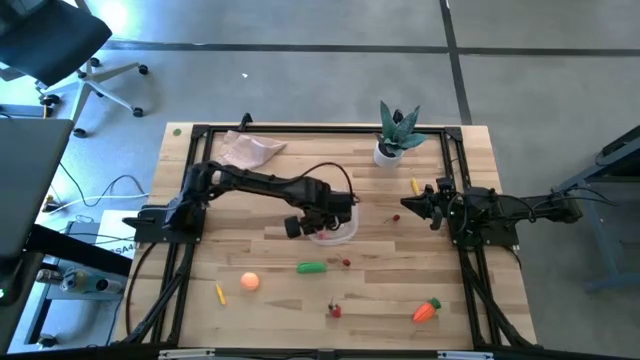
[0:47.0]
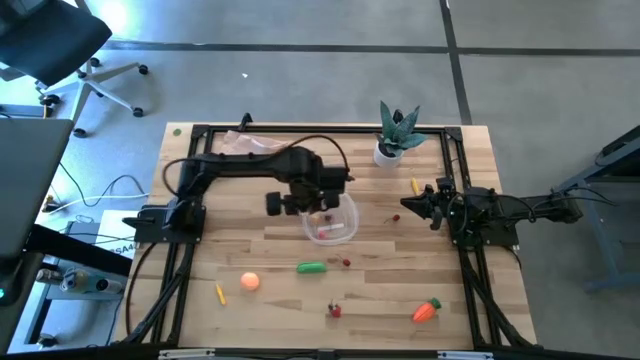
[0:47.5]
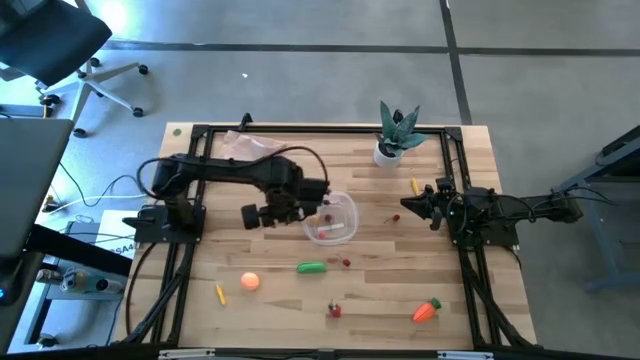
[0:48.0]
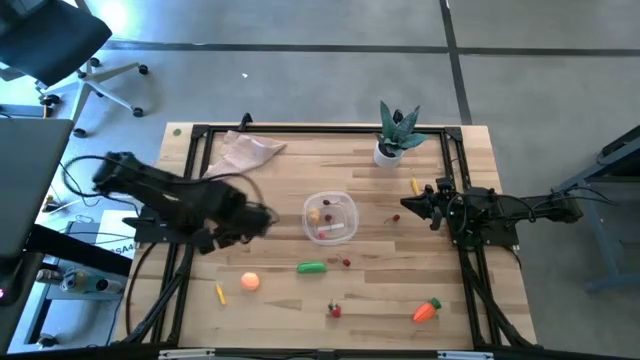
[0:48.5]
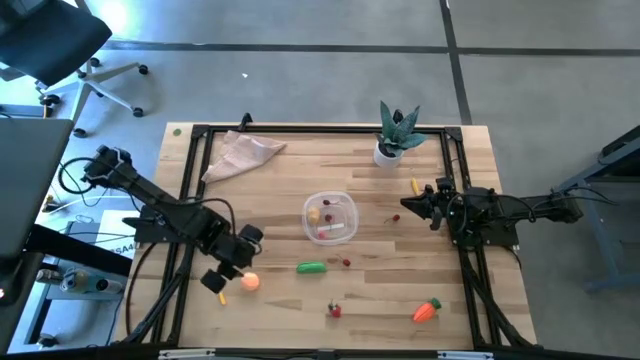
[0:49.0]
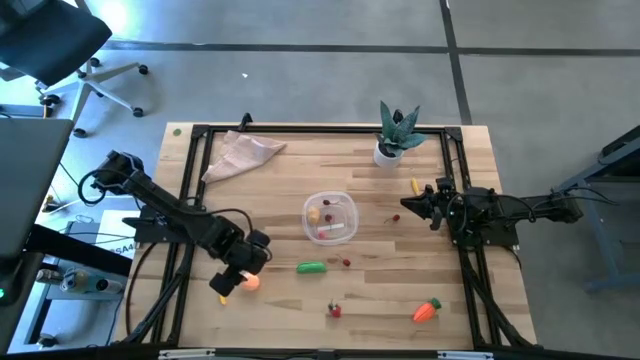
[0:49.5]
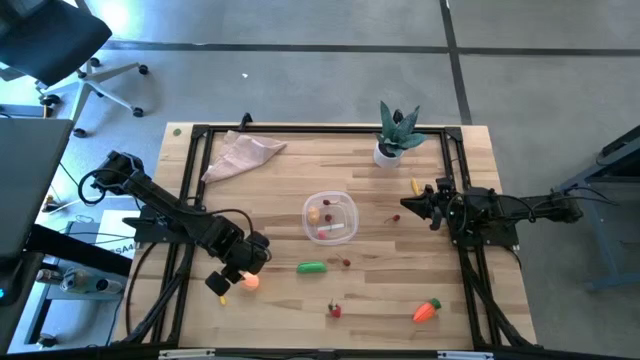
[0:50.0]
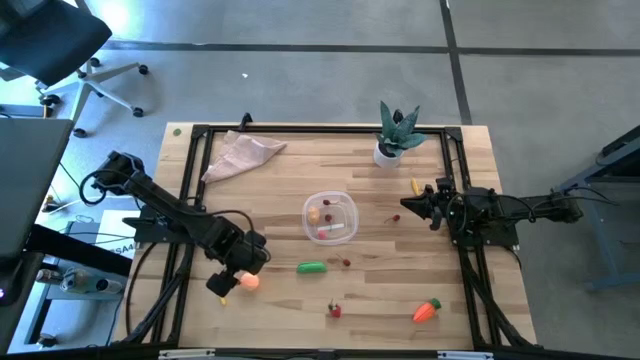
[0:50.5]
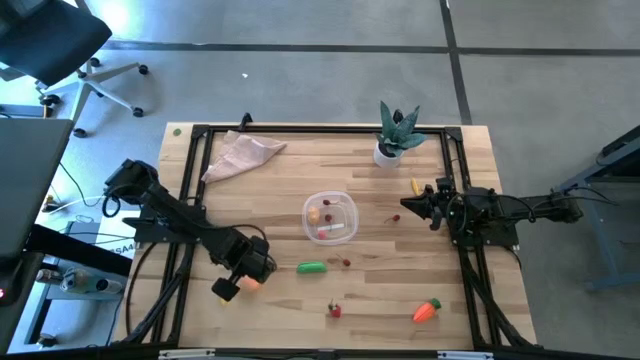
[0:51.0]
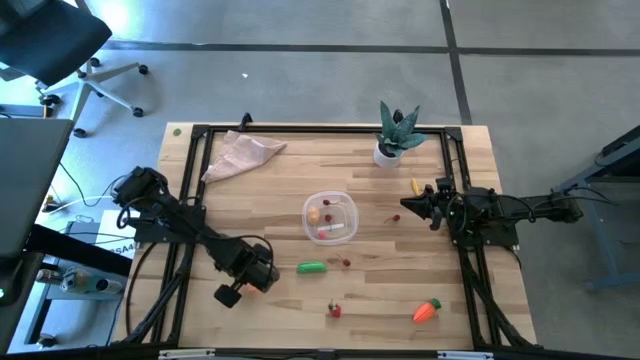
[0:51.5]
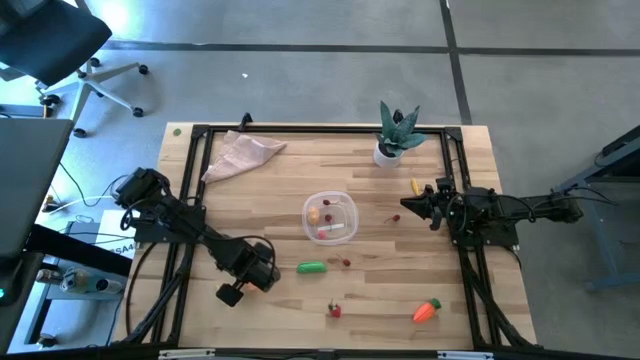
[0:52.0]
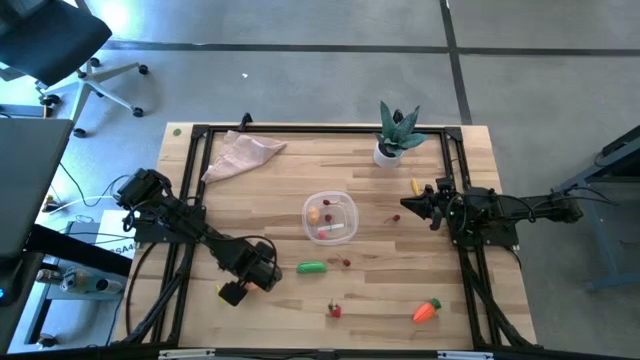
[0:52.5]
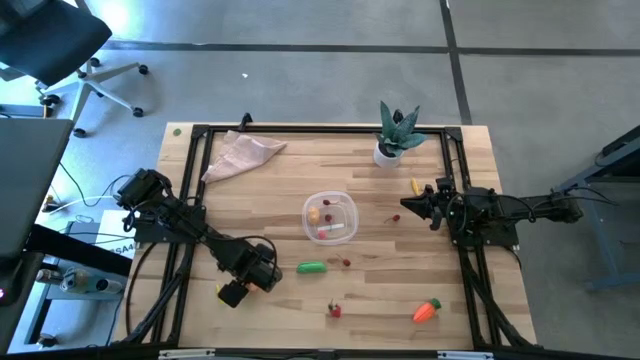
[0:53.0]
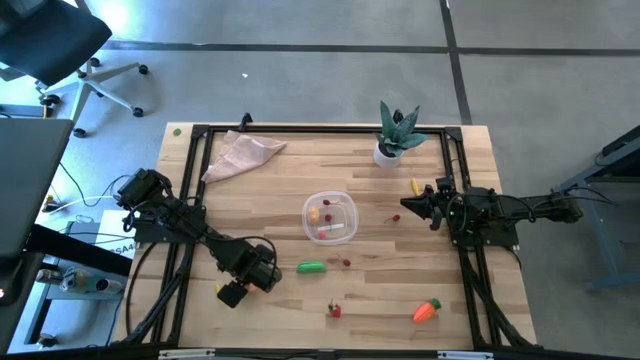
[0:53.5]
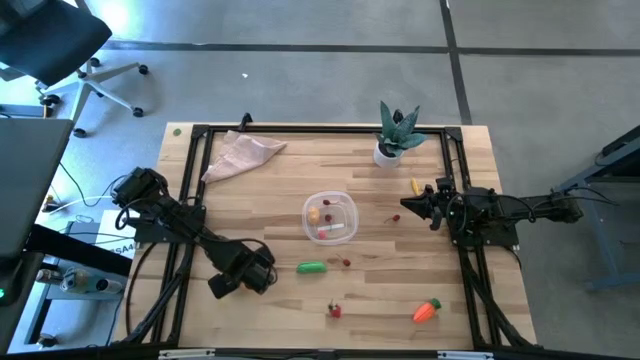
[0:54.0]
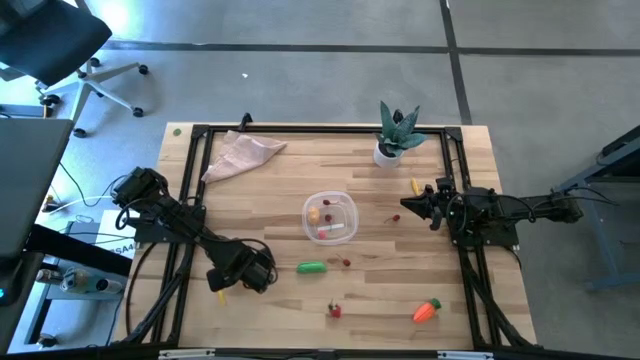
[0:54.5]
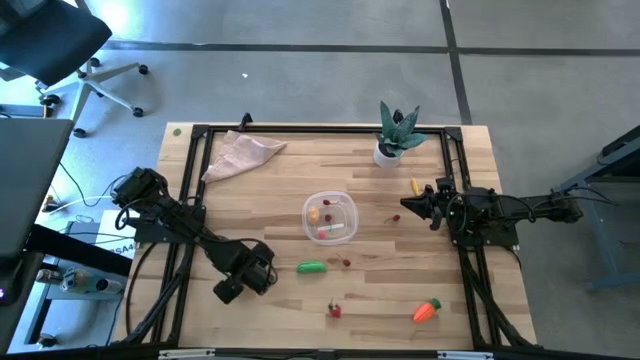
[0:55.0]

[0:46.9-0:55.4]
Task: Pick and placing Produce into tupperware
Put the orange peach into the transparent bin

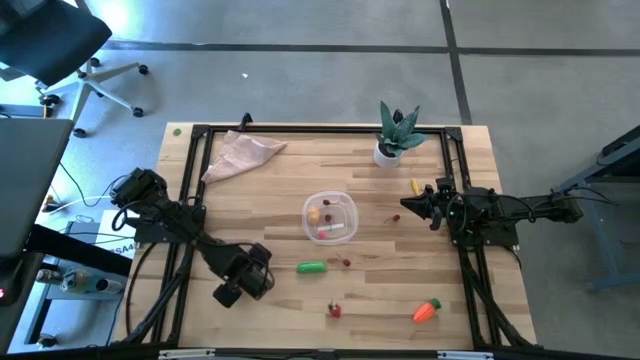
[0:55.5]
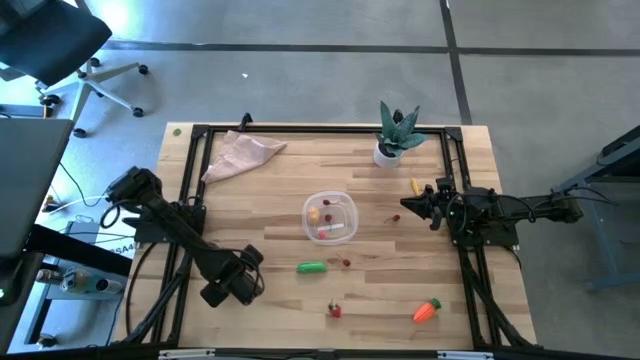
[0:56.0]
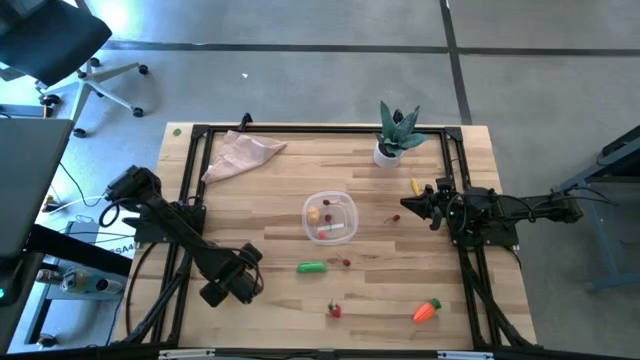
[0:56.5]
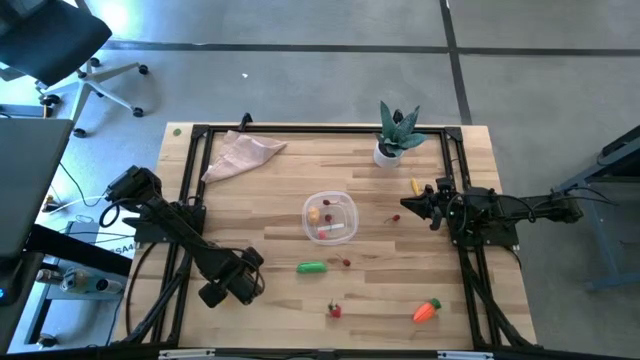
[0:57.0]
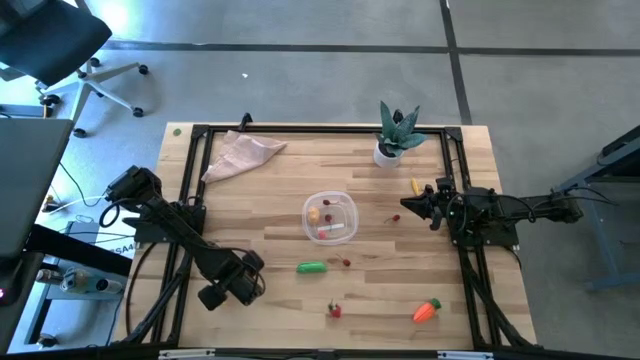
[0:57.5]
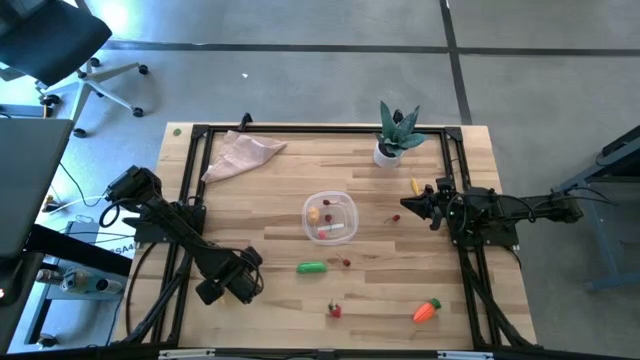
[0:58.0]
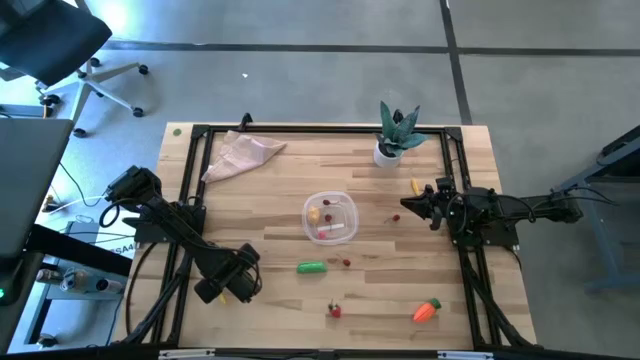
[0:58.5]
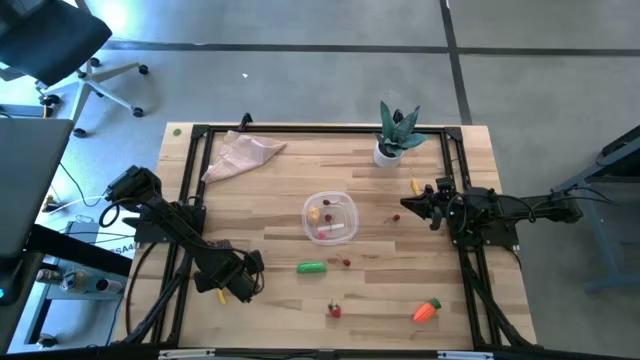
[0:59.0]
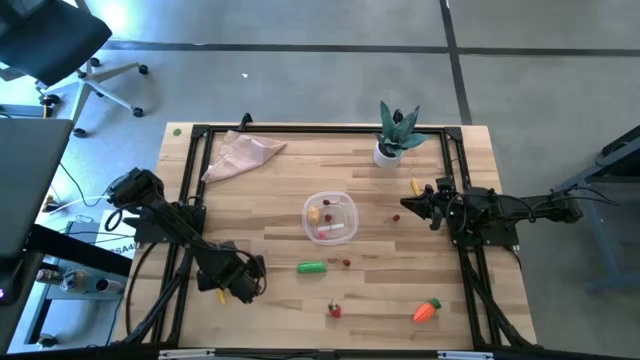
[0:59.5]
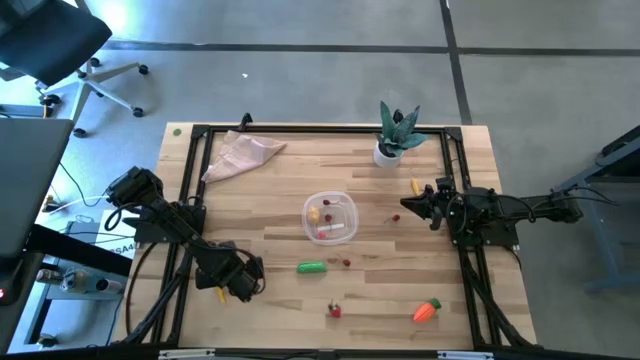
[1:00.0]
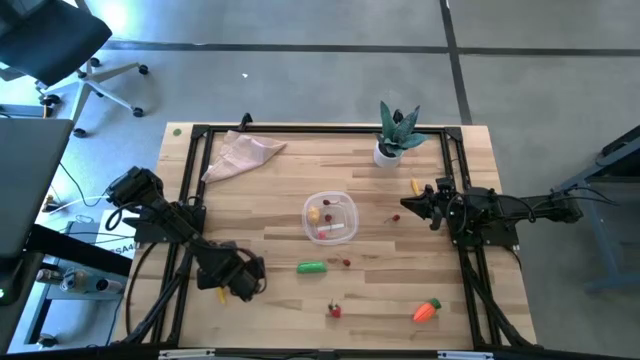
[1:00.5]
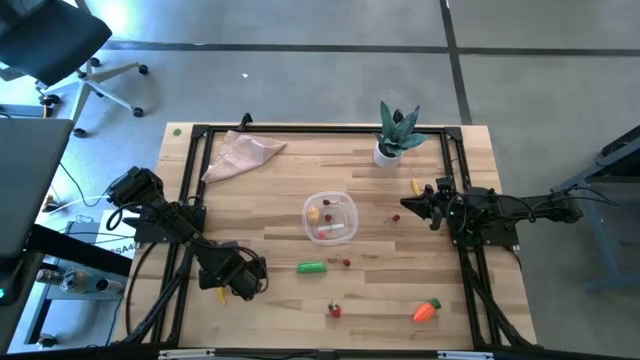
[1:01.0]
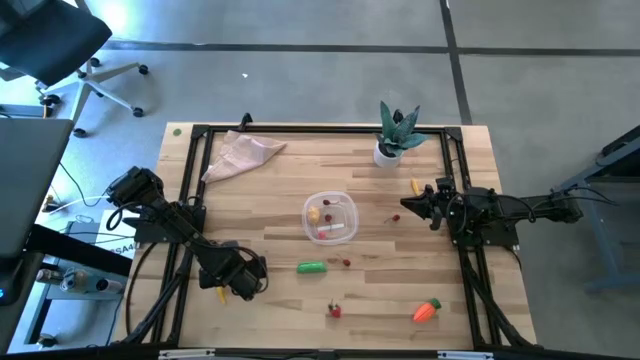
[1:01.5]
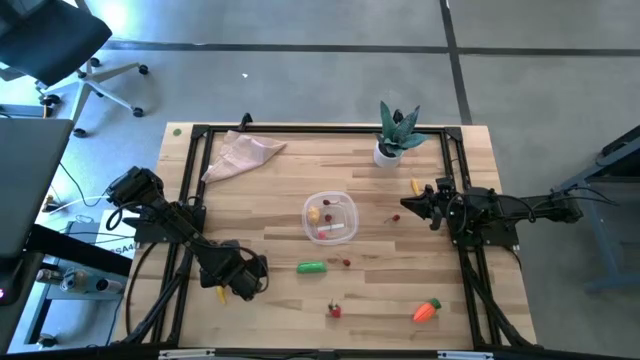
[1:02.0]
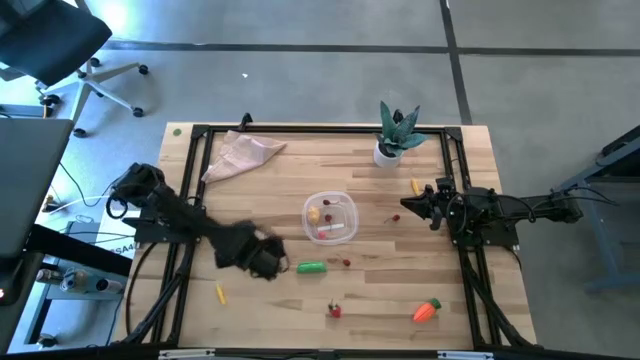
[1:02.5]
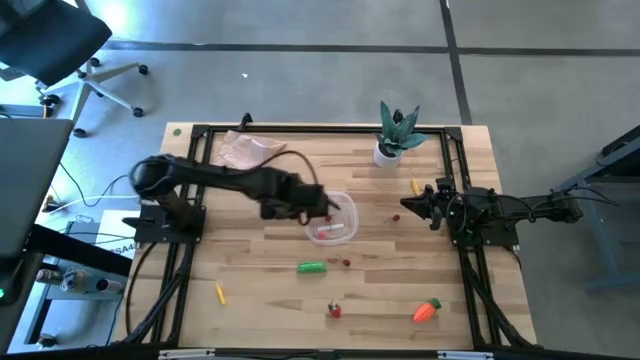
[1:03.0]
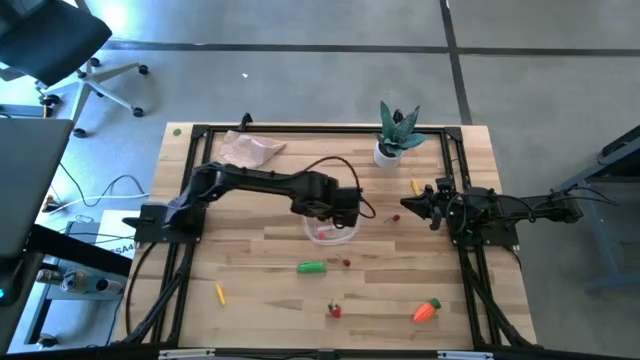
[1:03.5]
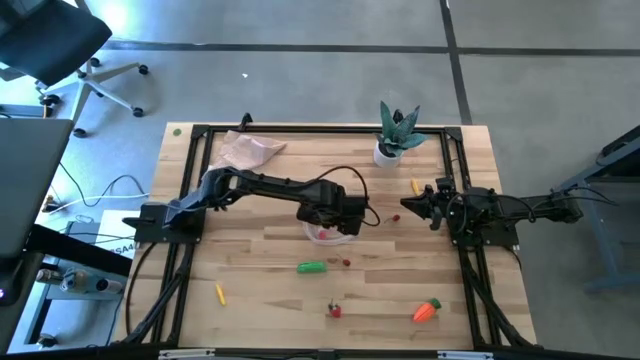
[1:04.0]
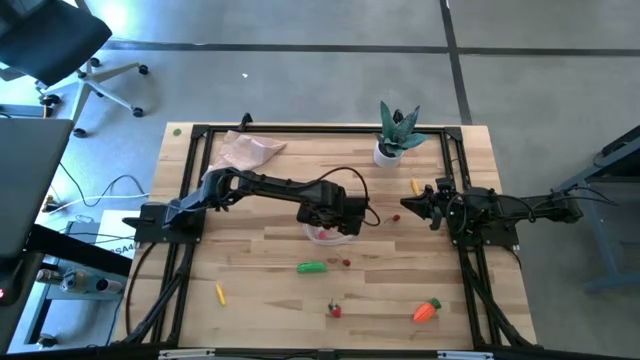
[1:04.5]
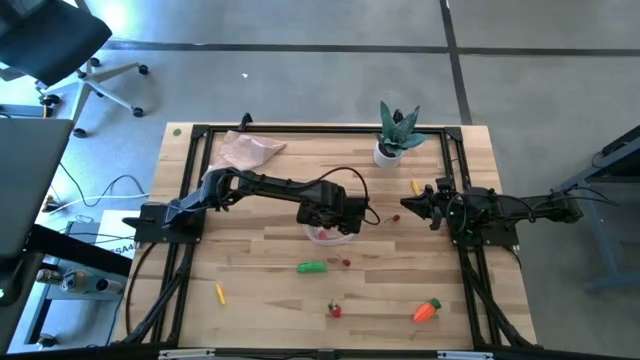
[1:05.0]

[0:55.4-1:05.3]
Put the orange peach into the transparent bin

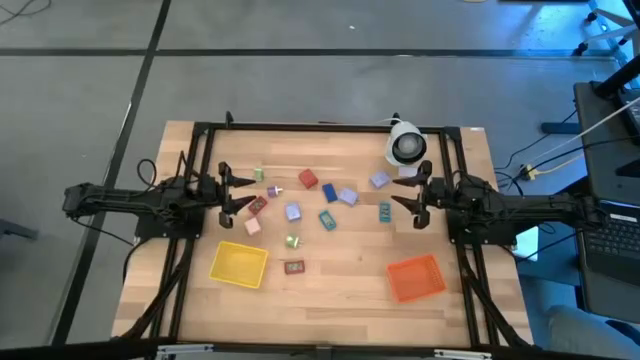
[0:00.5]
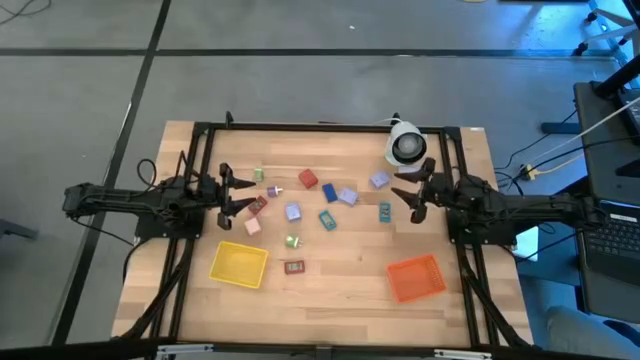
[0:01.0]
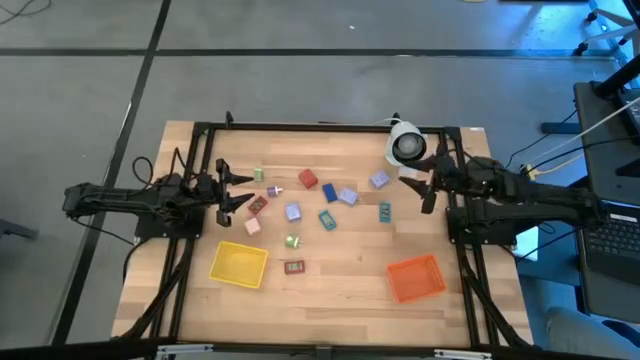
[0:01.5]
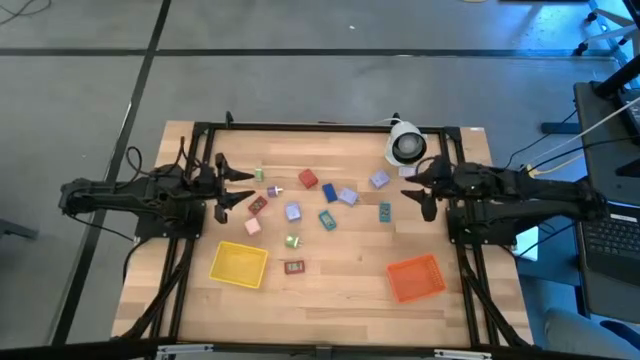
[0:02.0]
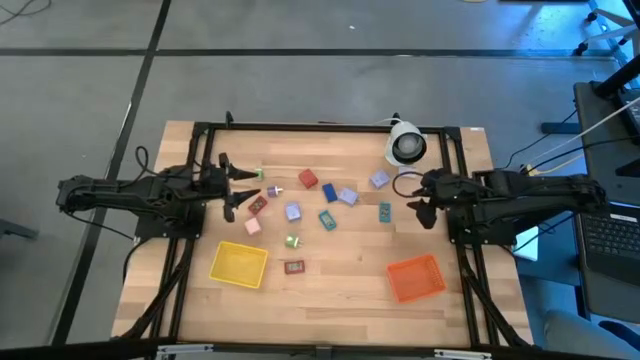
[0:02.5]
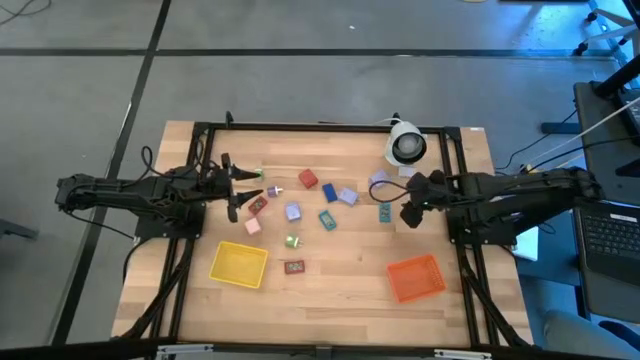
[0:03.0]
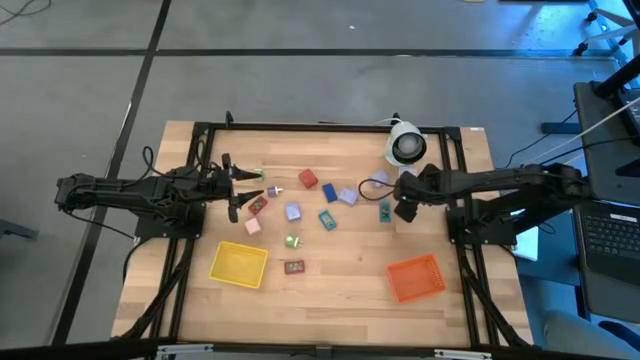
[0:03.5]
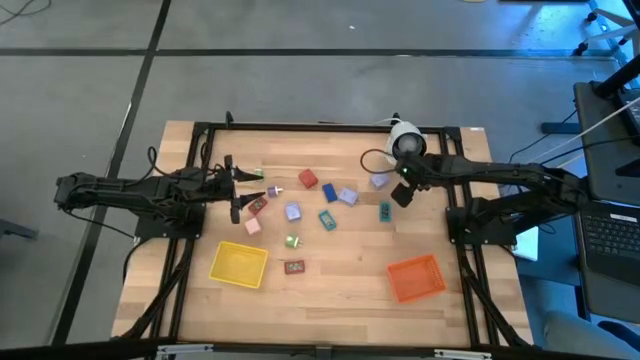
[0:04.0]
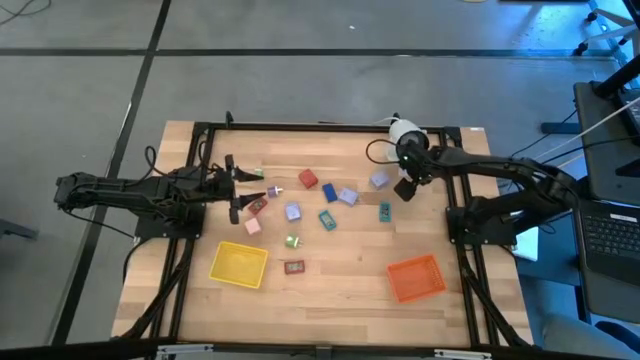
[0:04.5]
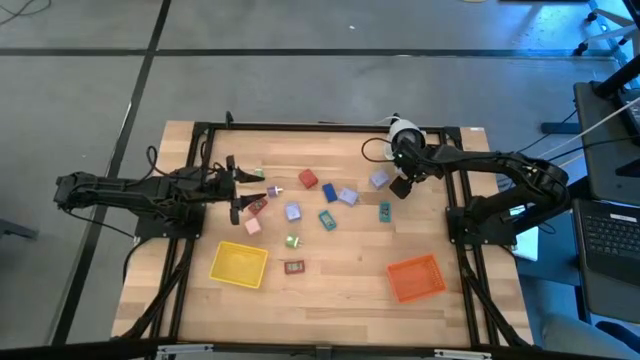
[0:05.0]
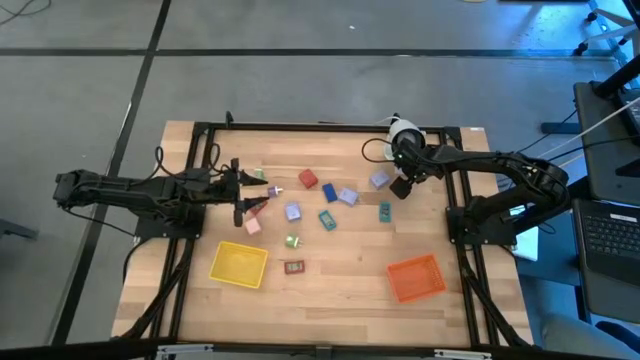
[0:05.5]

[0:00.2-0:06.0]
Task: Pick & Place Office items
Put the white digital timer into the yellow bin
